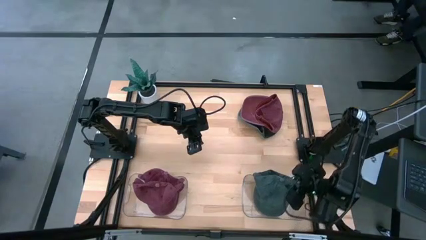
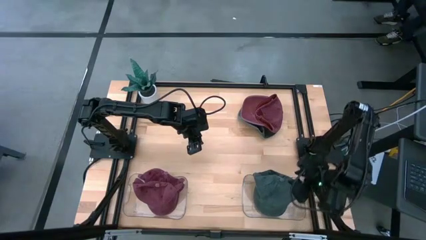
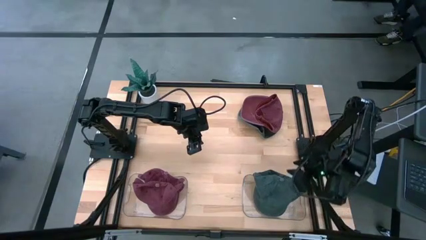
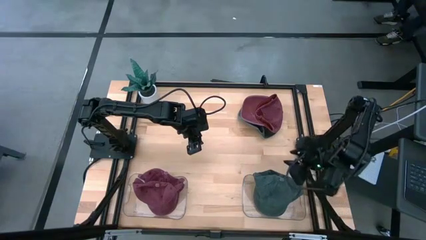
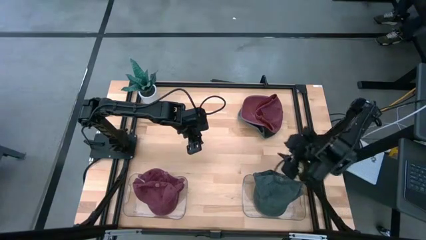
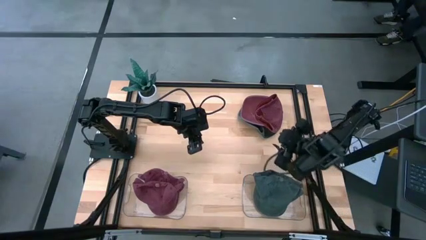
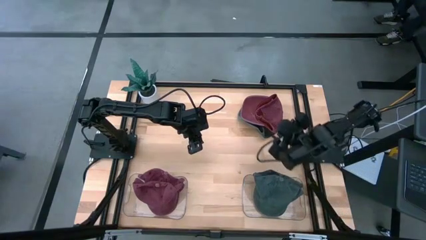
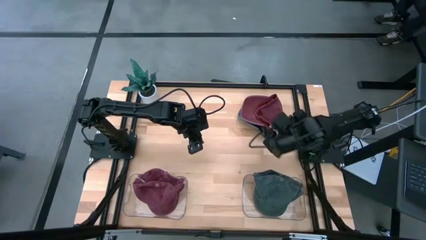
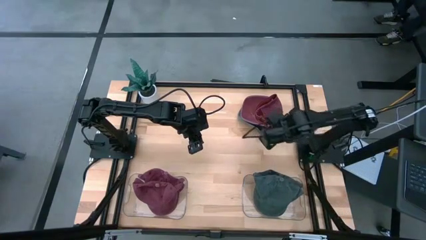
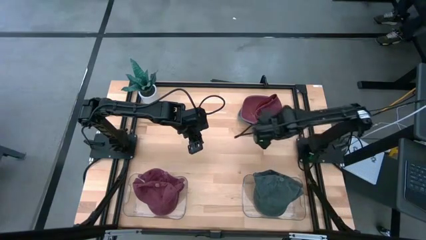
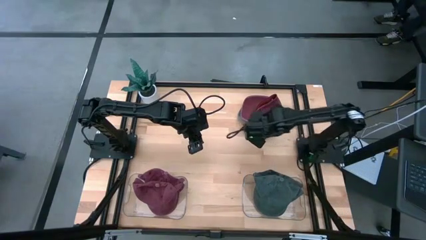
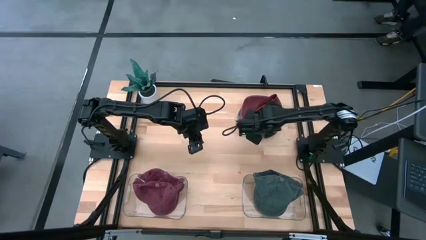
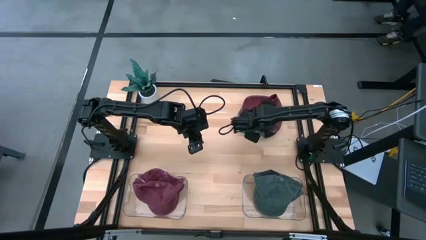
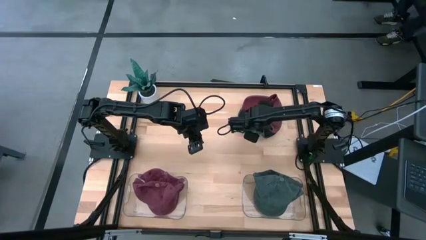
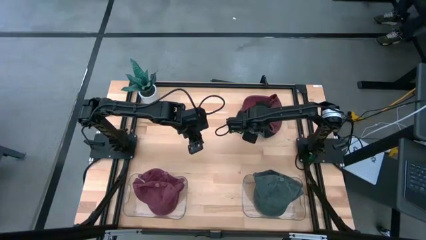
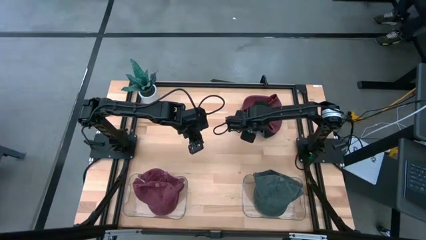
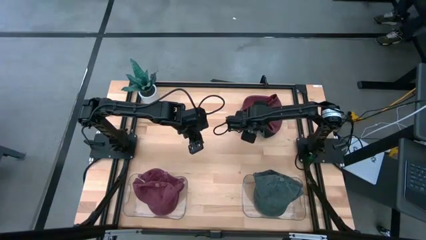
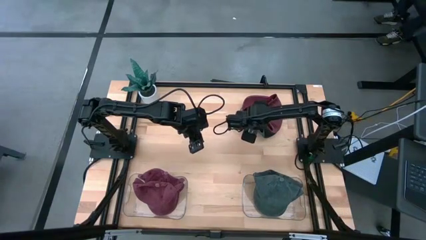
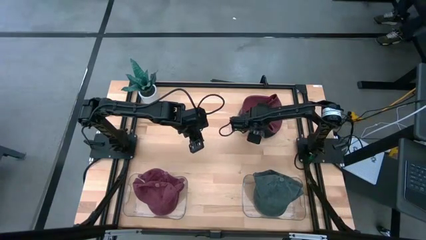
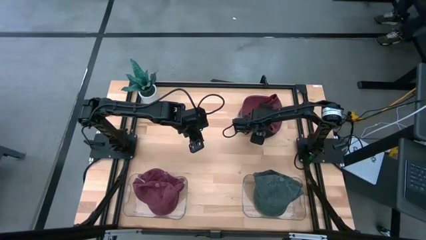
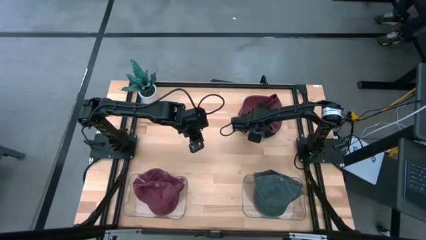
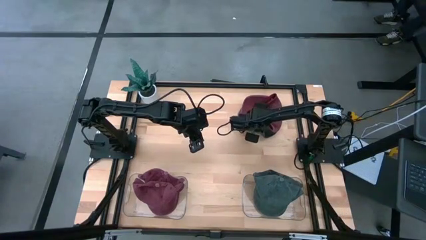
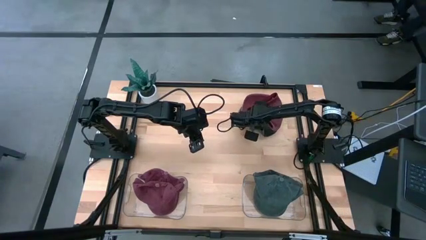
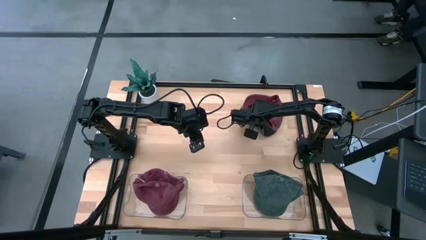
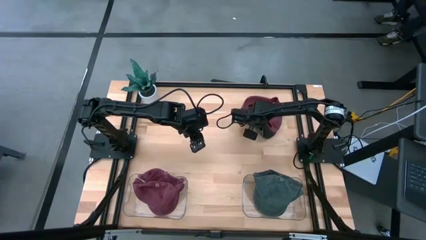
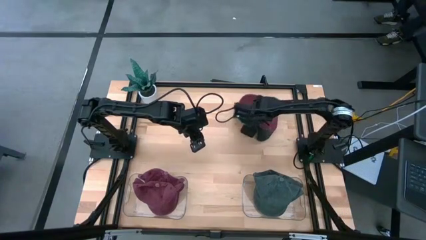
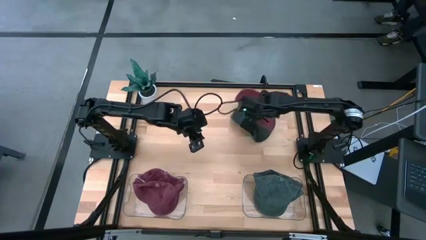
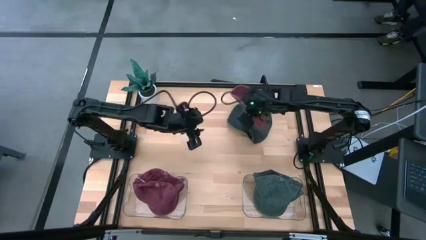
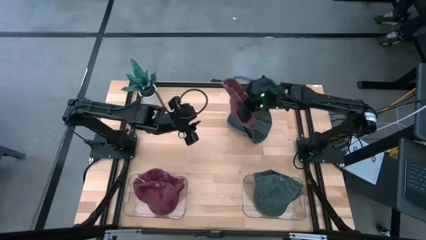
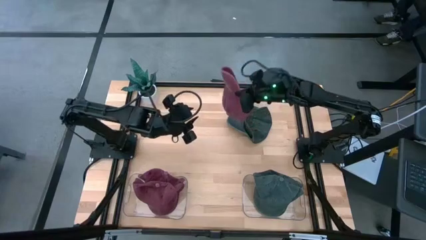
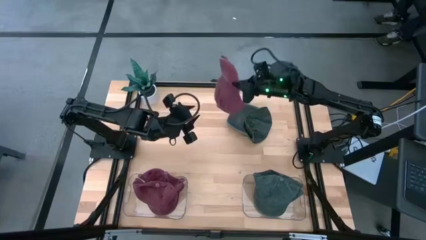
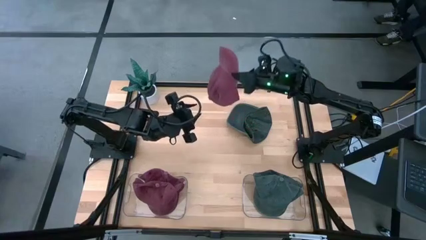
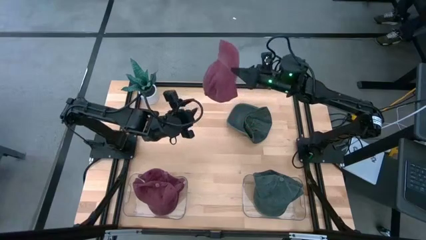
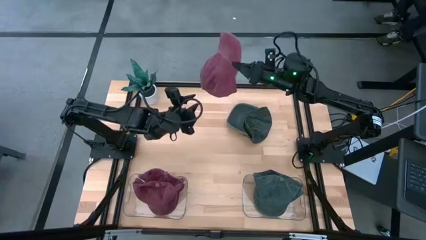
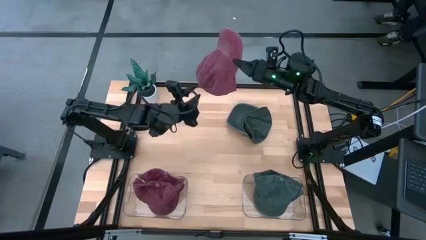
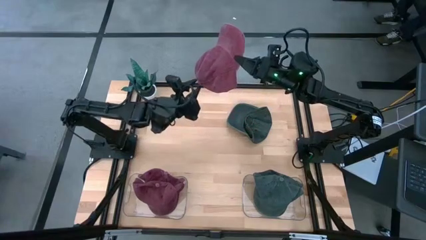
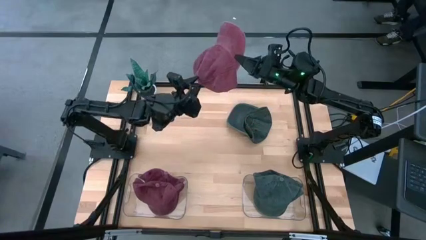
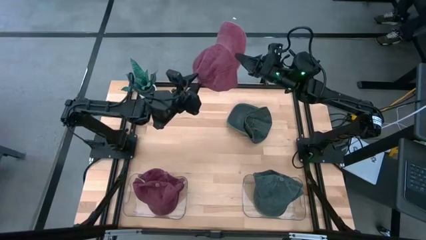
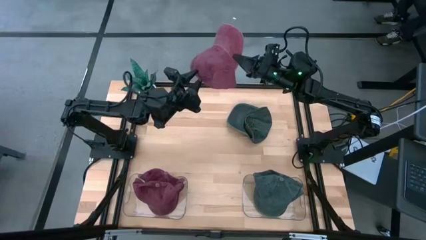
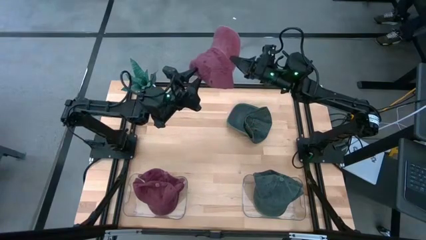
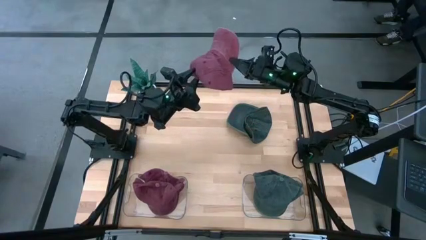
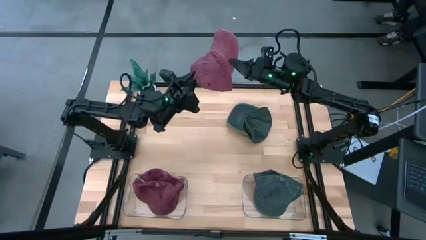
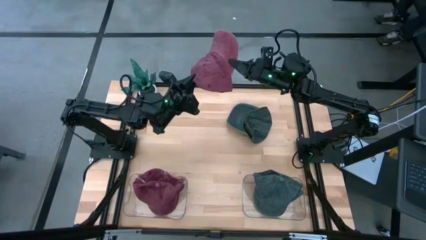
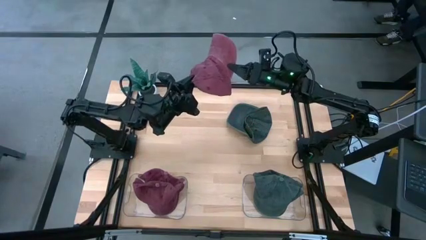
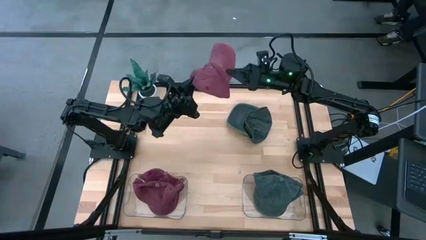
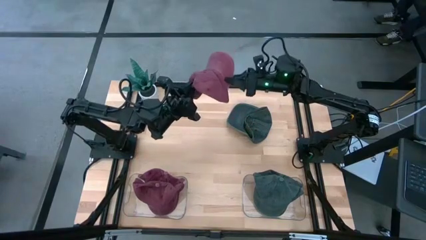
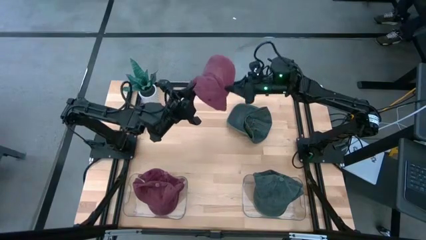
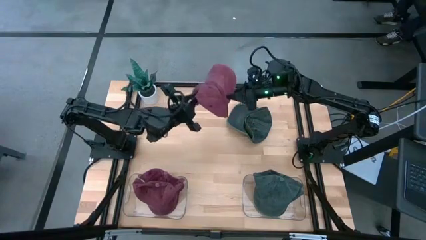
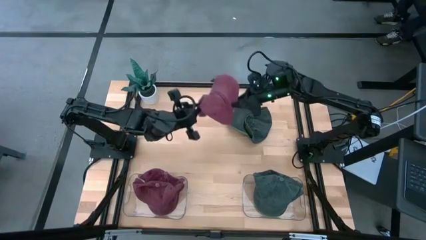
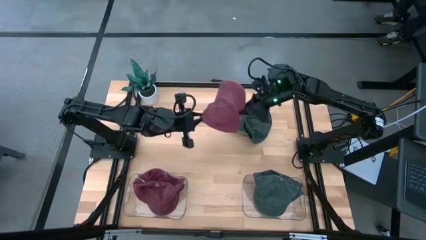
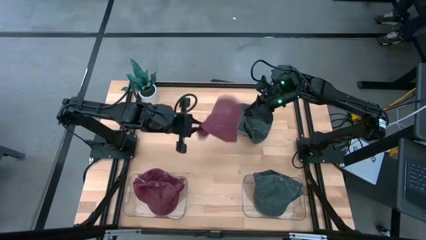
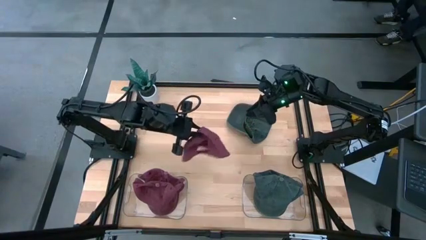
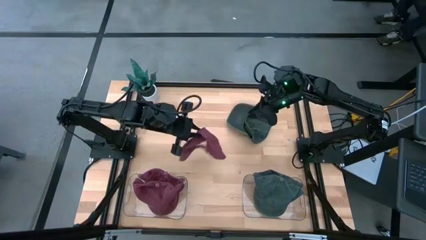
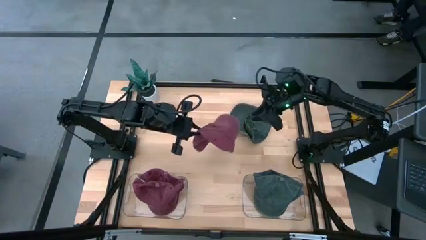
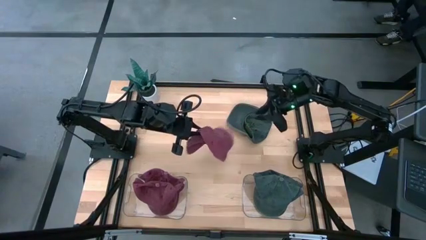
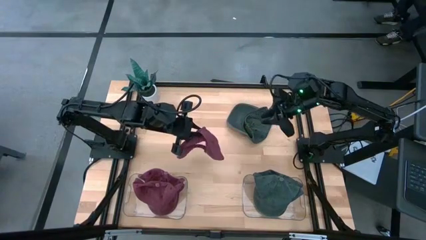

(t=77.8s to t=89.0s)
Task: Pick & Place hat
Put the red cap into the left transparent bin

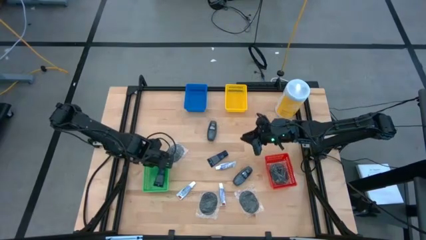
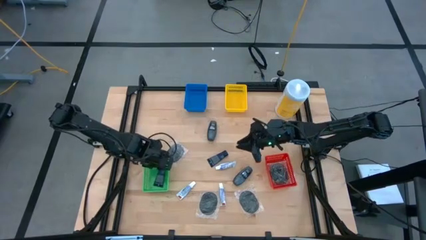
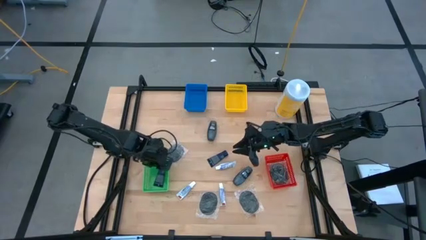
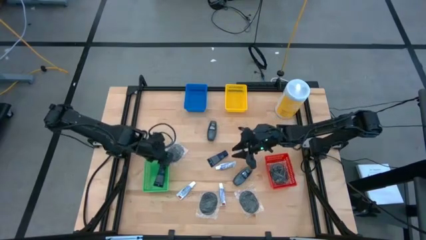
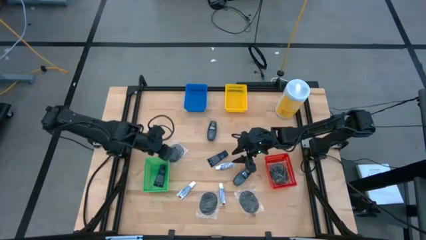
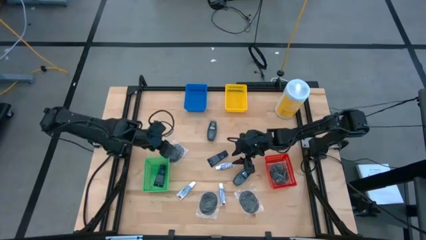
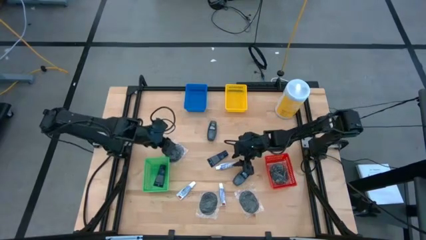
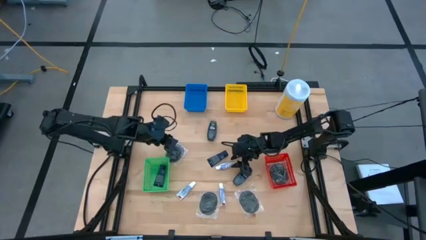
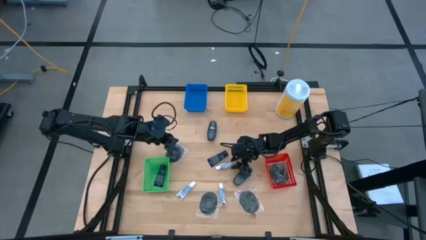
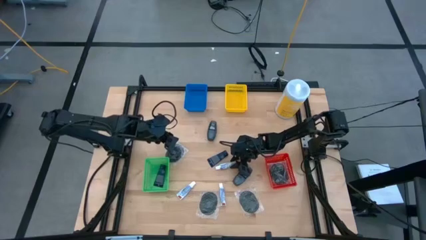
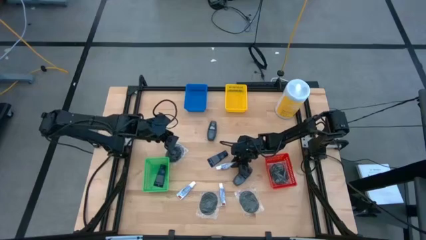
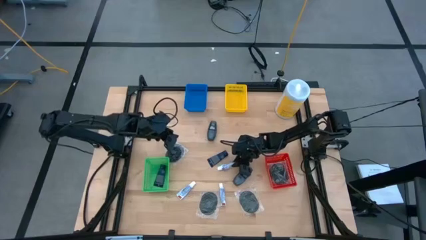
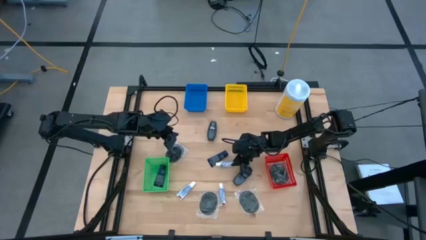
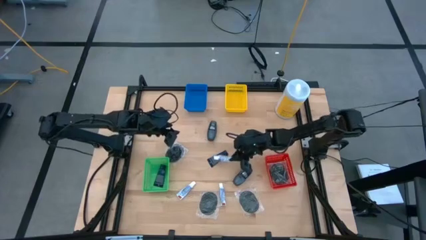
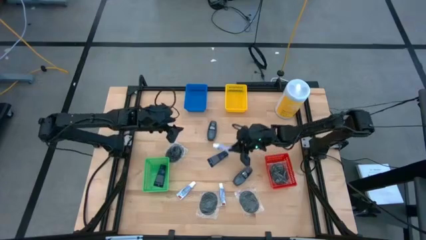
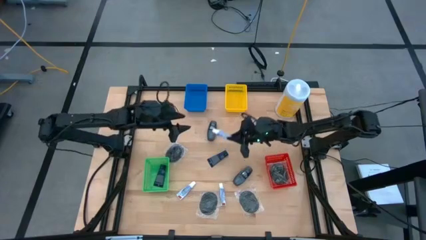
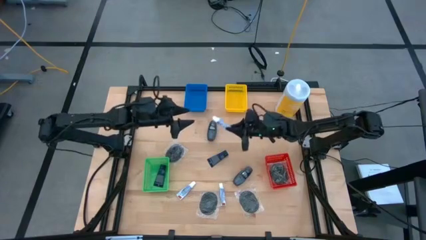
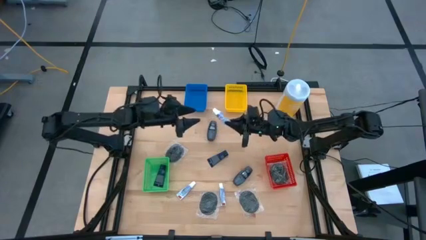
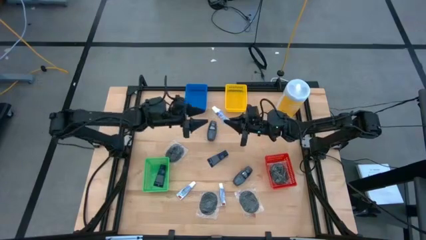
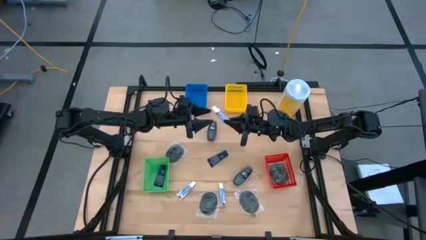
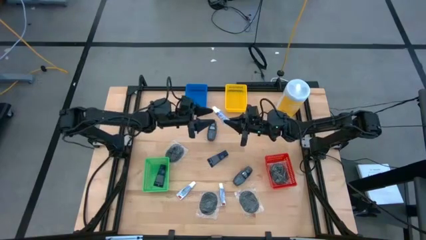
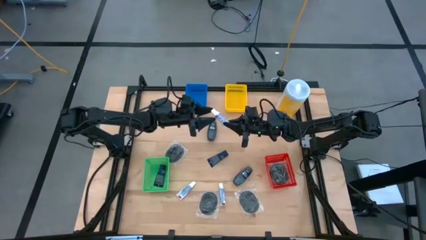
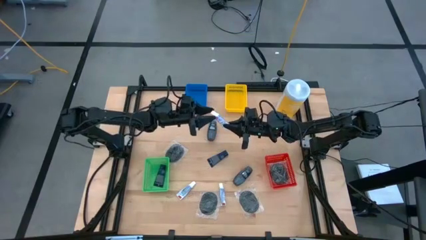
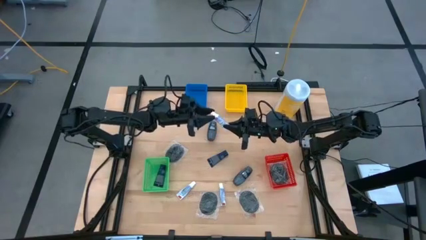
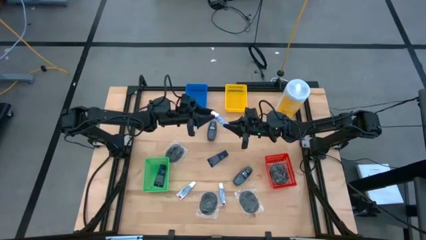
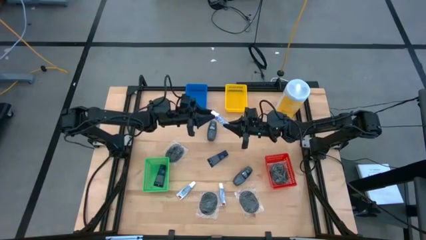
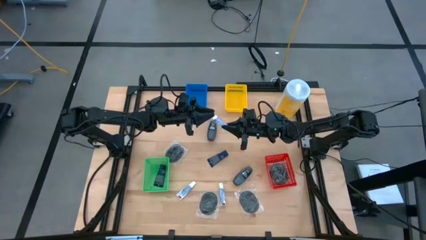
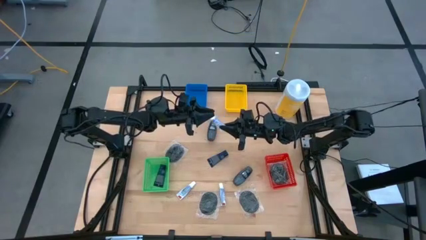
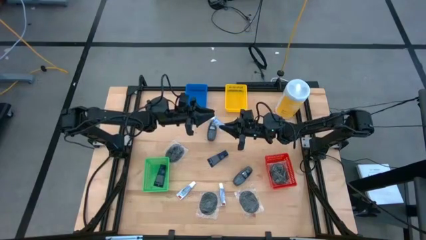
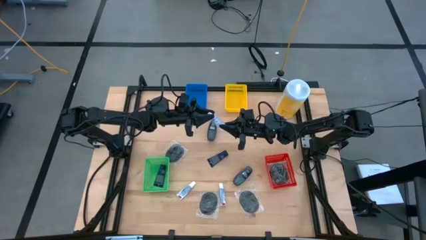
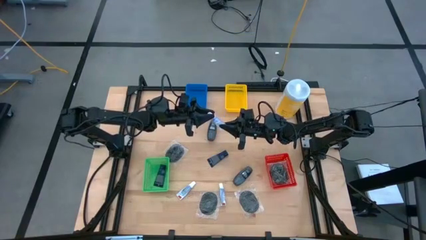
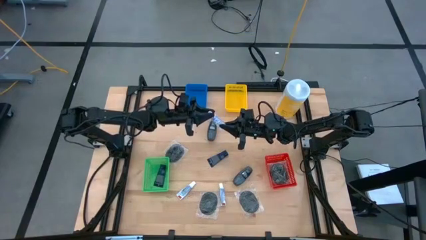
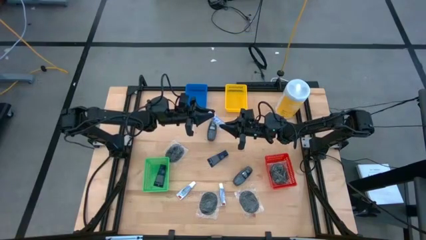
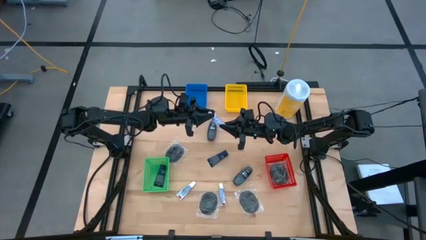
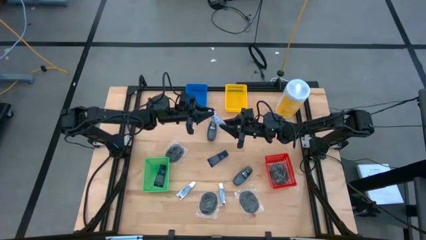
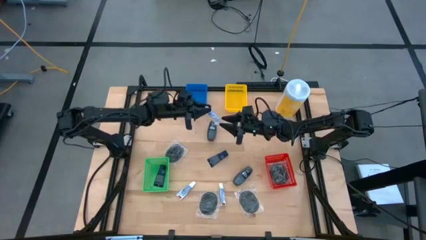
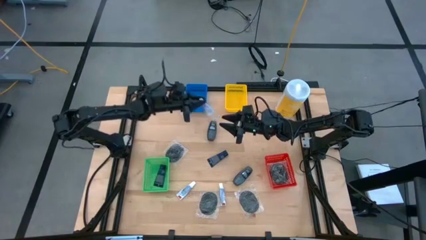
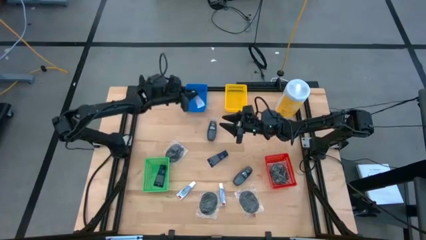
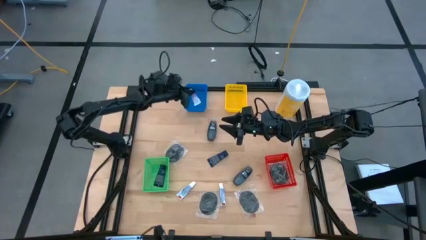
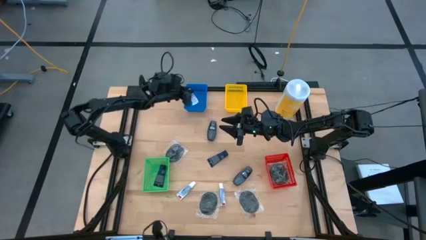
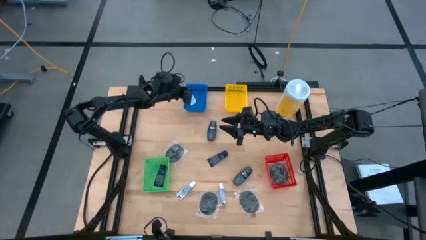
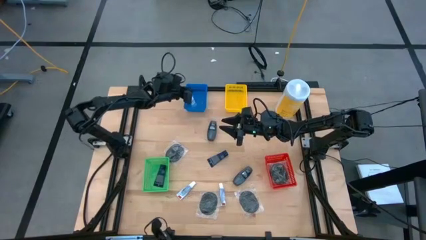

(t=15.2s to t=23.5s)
Task: Pick & Place Travel size toiletries
Put the white toothpaste into the blue basket
